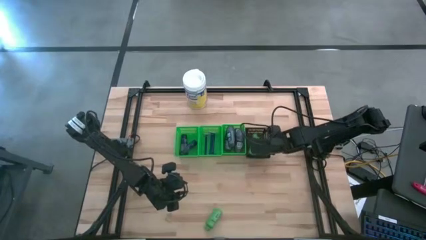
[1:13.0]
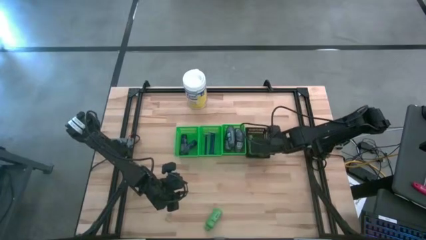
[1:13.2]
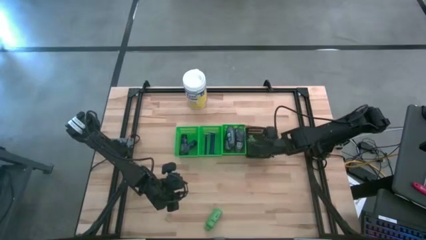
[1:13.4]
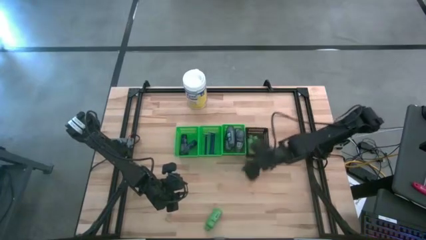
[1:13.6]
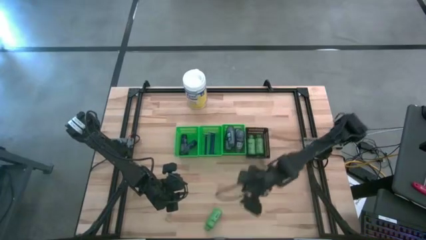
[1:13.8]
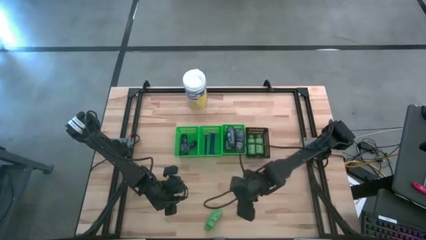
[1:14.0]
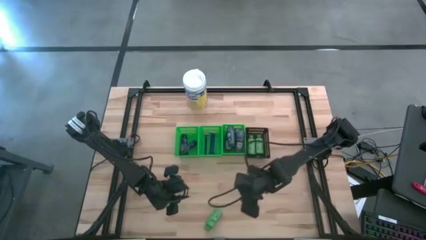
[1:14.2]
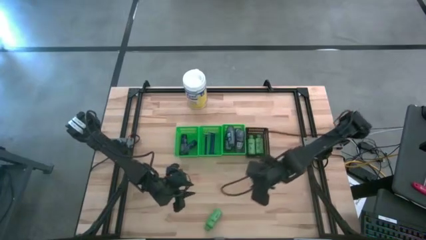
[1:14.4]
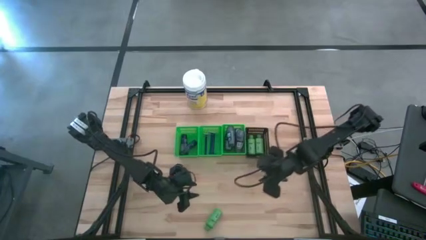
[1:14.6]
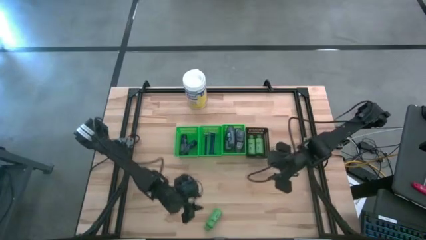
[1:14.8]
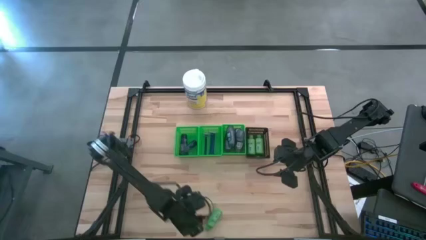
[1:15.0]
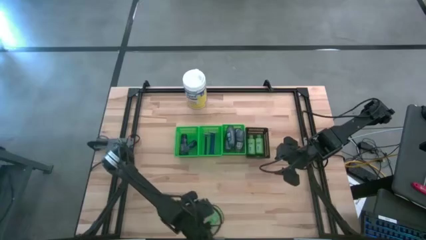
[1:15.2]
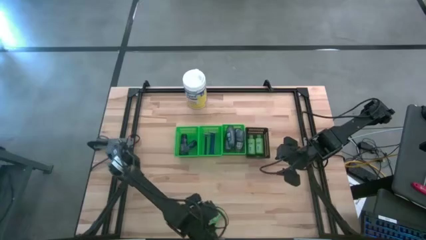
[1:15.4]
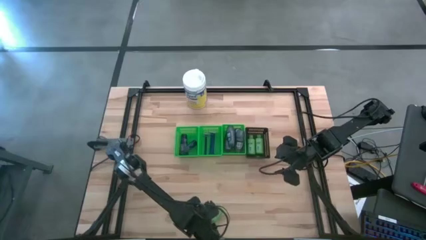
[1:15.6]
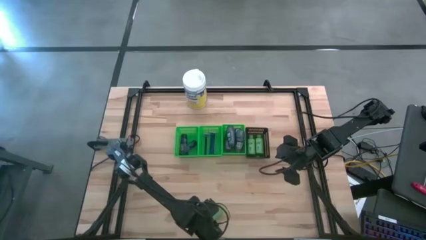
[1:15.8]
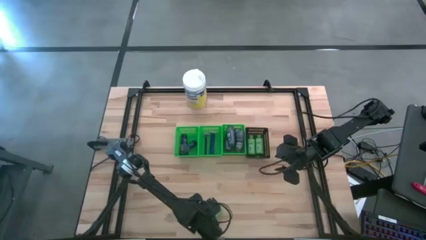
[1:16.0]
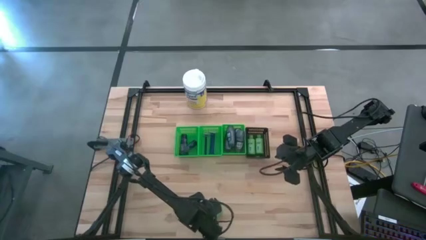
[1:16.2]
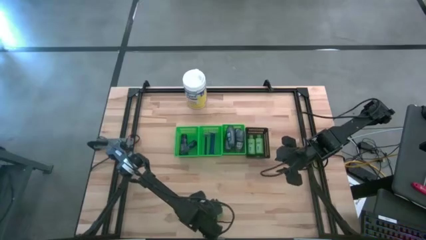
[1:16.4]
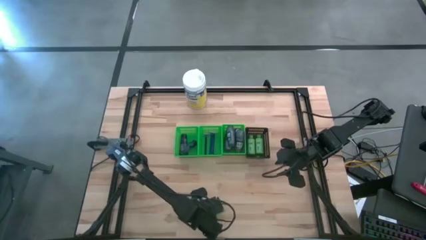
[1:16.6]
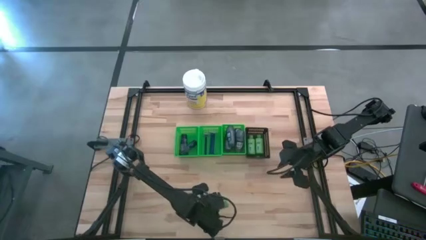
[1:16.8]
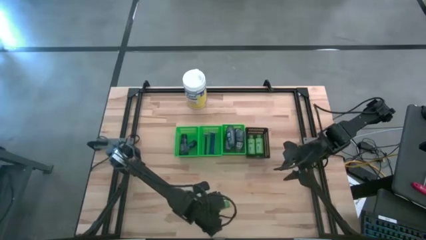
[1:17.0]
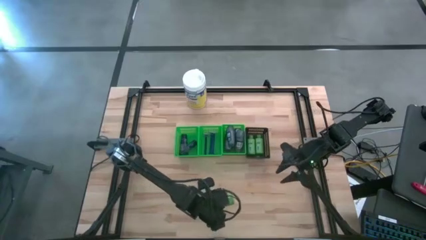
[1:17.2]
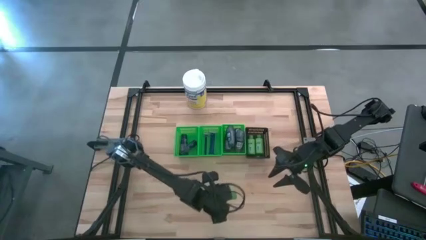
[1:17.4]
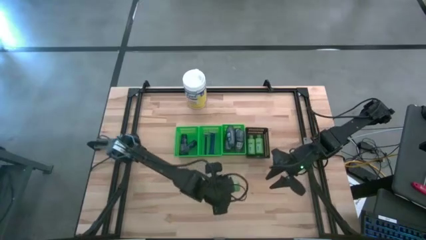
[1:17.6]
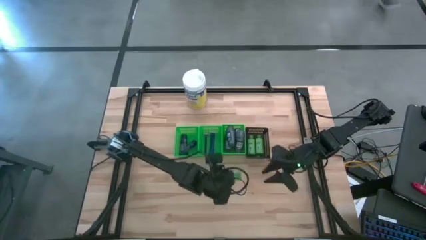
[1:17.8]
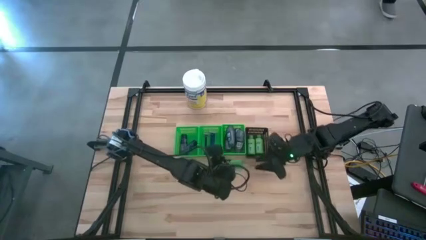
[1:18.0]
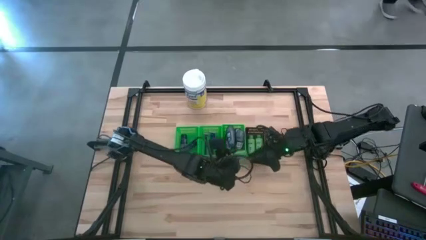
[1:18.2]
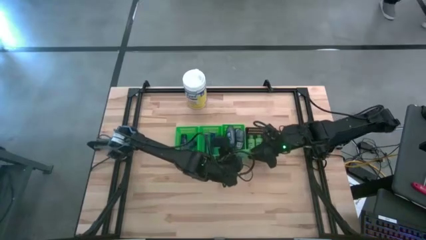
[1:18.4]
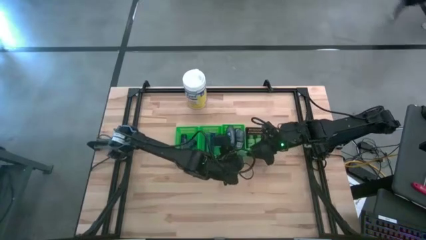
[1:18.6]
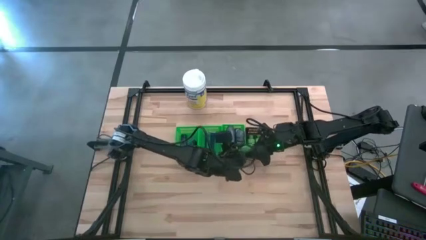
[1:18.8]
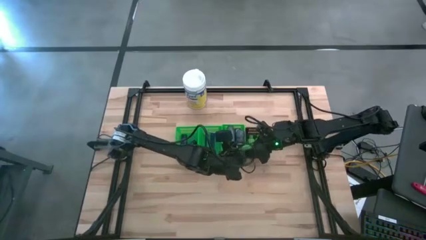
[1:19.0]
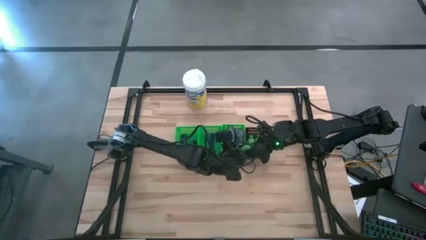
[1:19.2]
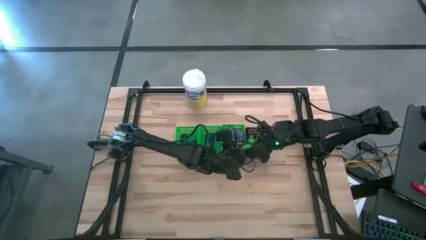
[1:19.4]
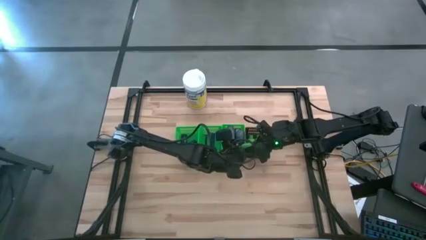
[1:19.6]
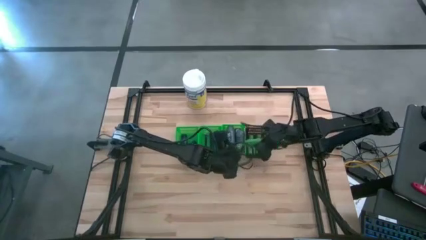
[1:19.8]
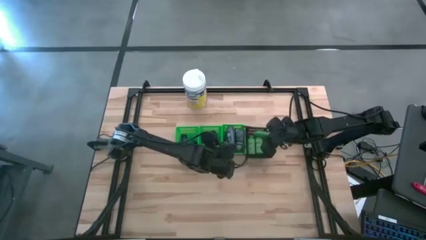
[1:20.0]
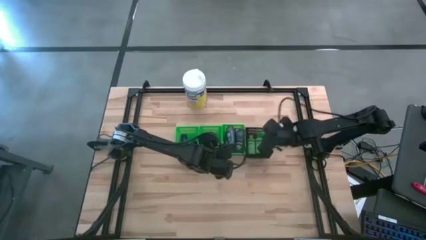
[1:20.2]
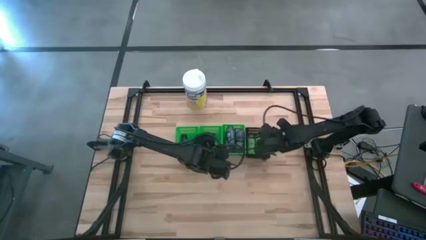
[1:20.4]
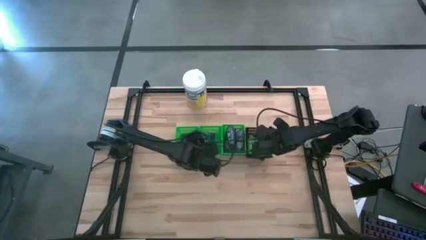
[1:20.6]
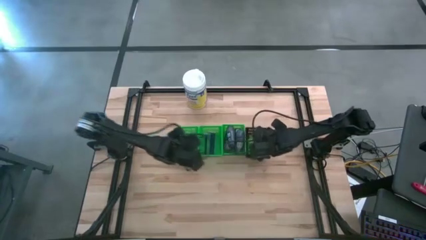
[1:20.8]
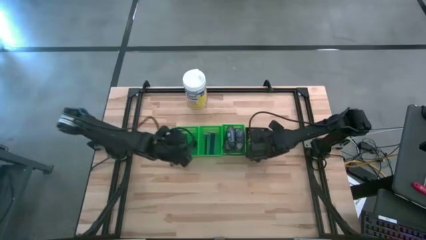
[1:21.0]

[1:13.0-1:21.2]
Task: Pick & Place Travel size toiletries
Put the green shampoo into the black bin

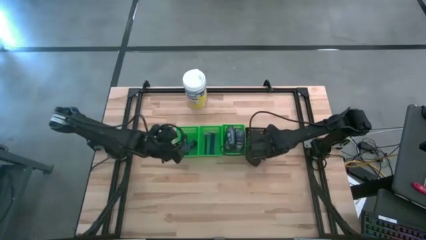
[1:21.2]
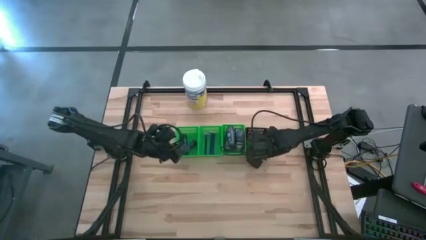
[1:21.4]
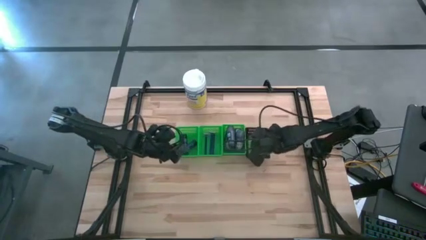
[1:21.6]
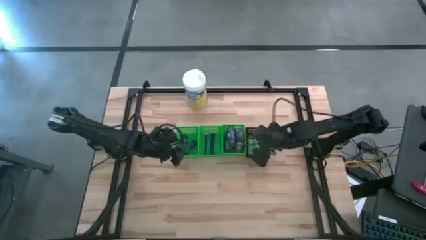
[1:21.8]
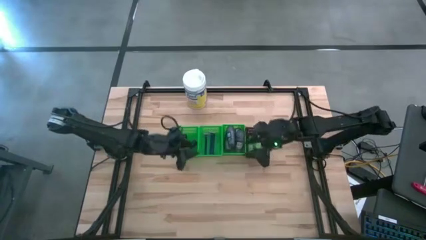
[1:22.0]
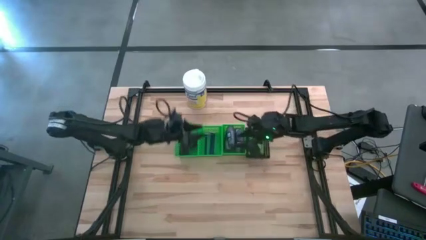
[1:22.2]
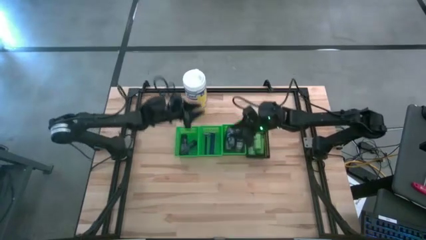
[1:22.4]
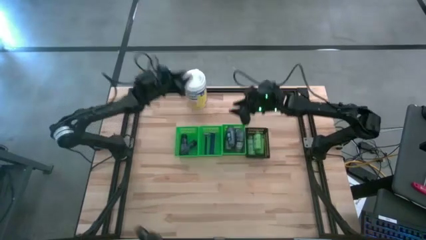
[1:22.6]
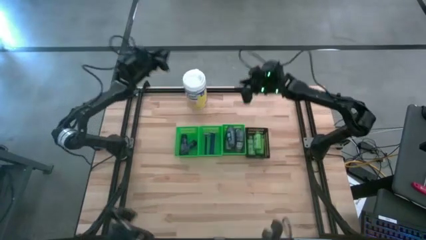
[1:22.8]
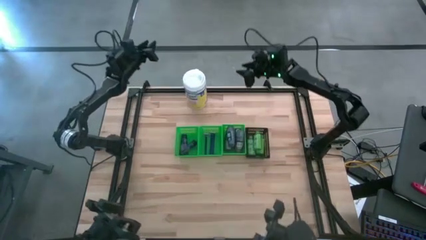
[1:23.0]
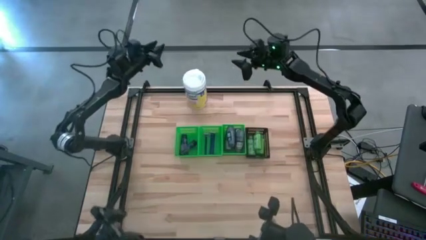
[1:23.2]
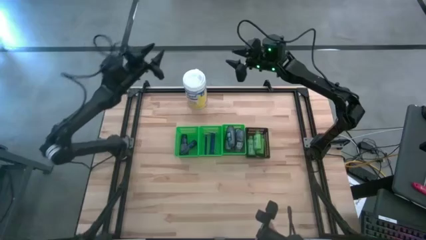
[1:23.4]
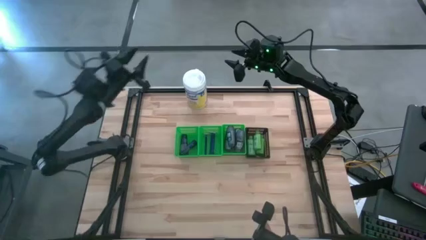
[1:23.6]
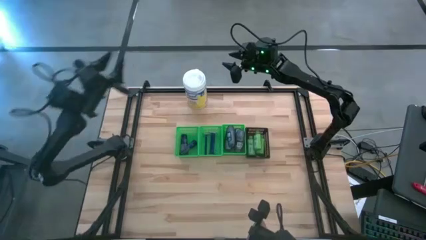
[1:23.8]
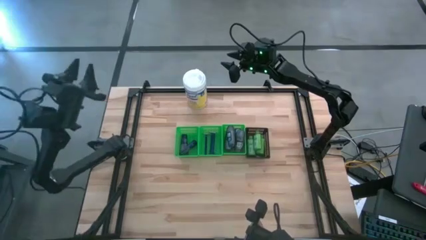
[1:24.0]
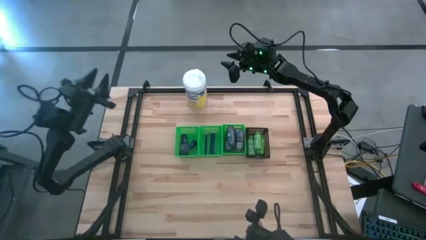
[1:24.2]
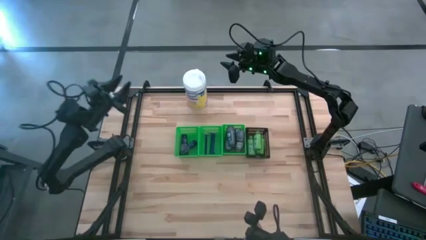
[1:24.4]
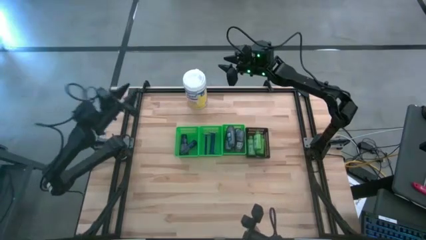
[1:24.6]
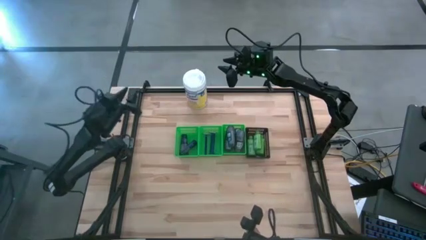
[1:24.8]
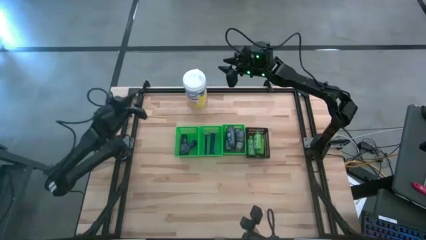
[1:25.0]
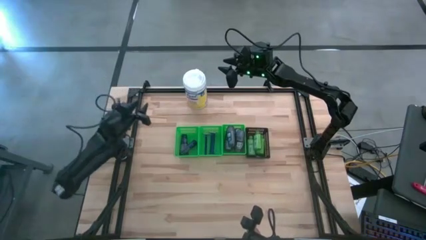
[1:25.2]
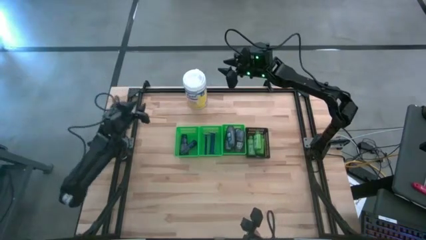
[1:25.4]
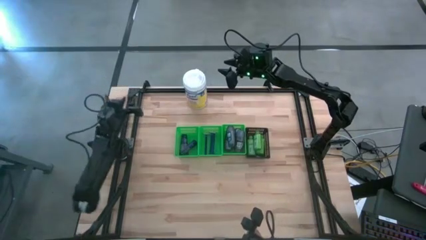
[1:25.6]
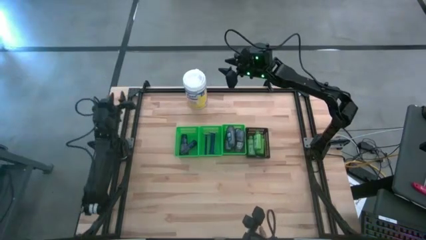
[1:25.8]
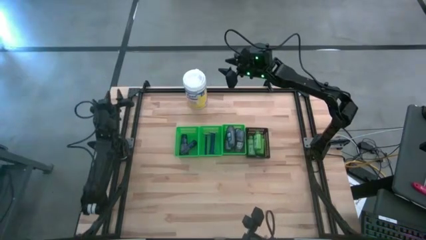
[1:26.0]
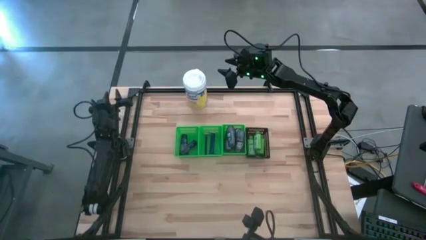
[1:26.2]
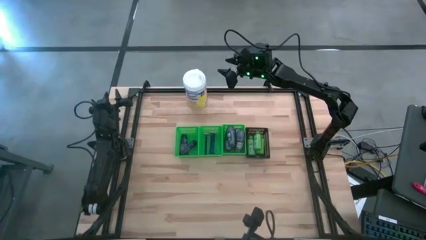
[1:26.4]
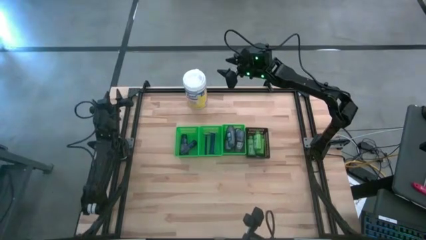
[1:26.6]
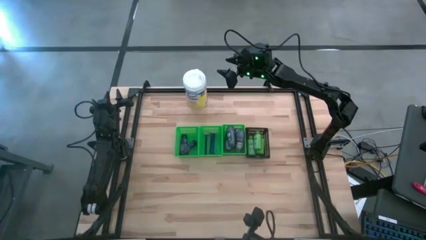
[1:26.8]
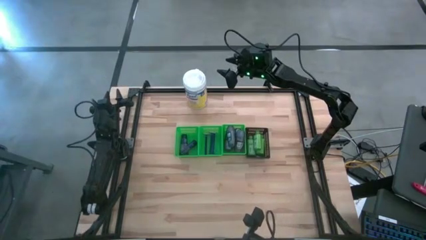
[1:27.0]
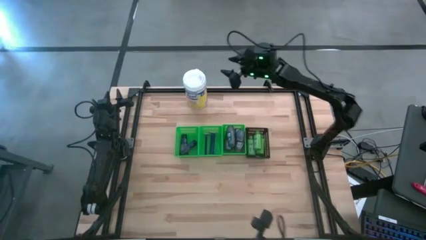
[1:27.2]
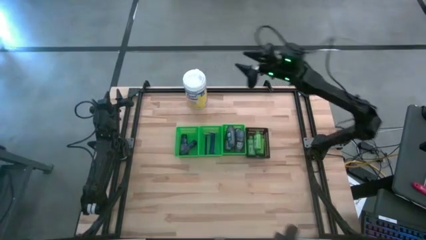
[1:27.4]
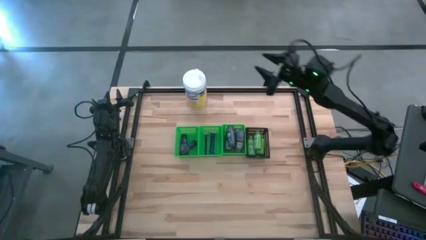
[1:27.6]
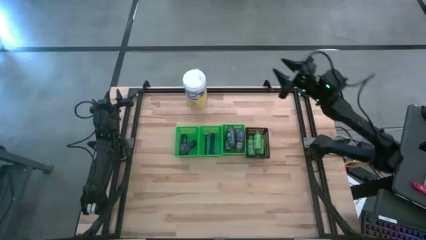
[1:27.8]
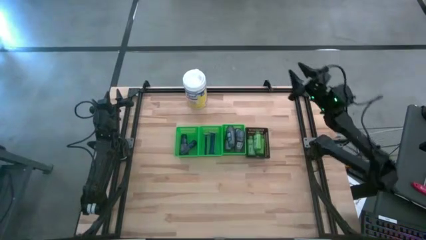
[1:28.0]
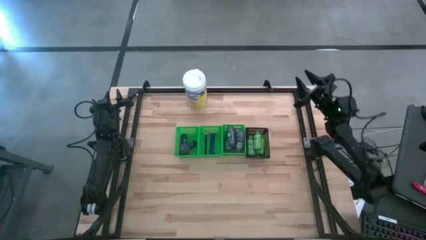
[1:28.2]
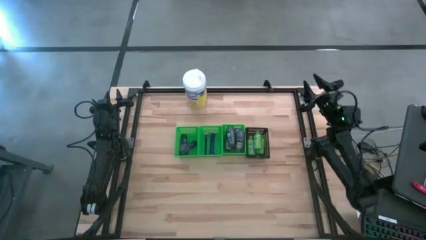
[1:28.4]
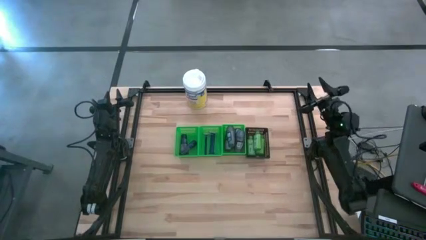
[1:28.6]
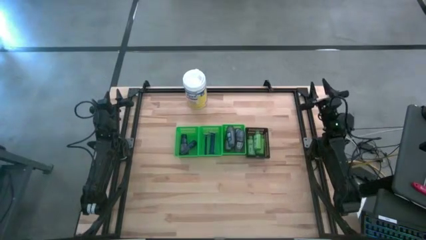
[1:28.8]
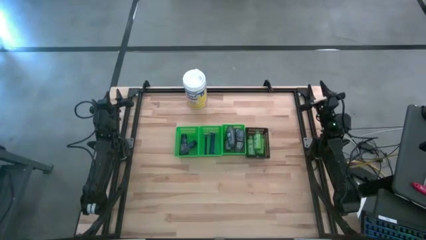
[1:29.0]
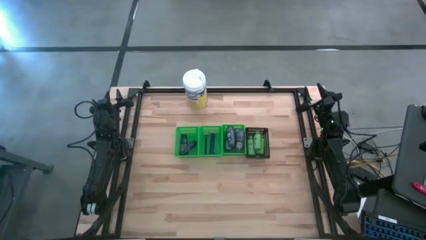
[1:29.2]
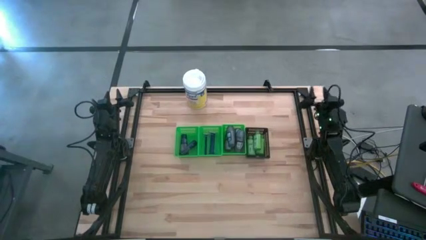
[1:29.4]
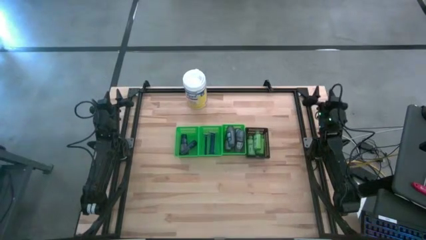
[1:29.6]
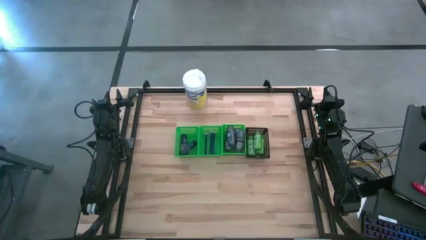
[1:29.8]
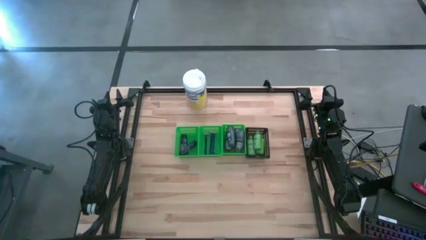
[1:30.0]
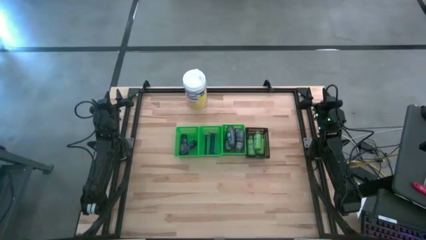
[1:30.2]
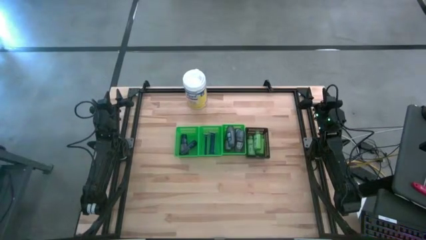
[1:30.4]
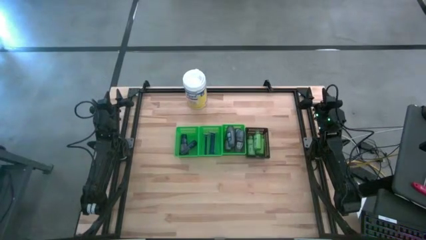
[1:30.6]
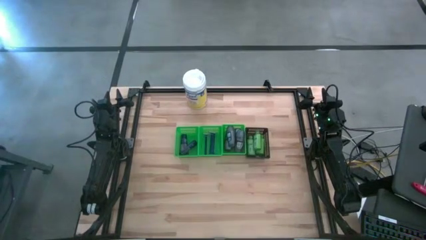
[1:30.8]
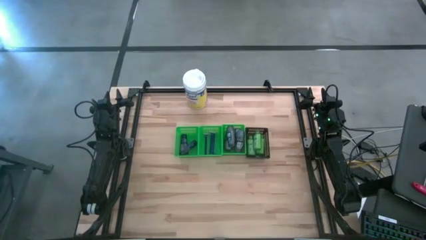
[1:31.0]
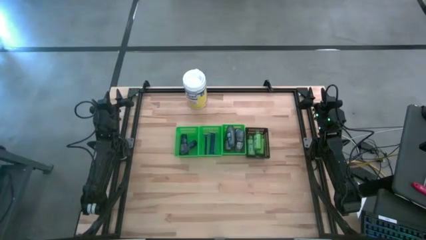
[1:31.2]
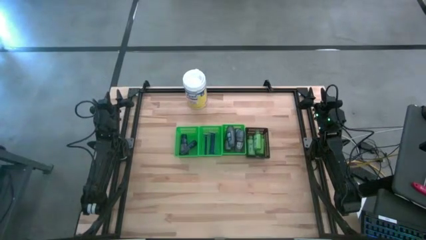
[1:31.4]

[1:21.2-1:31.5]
Return to Home Position
